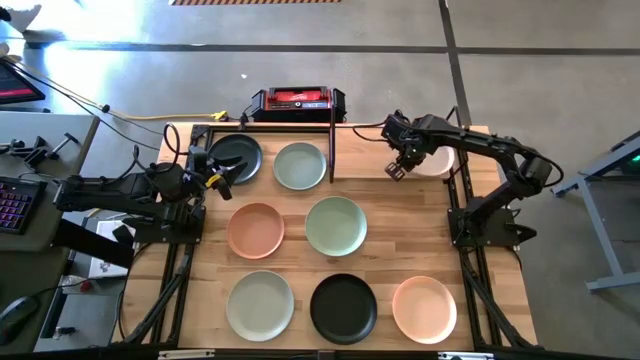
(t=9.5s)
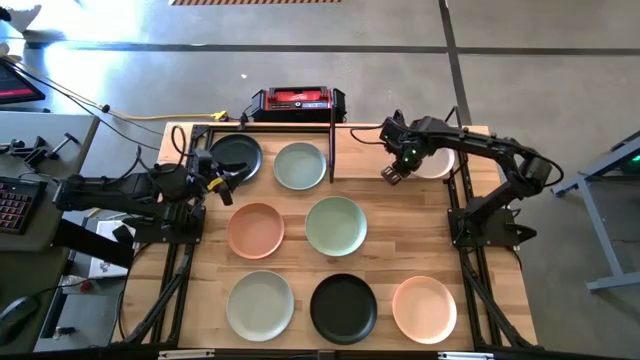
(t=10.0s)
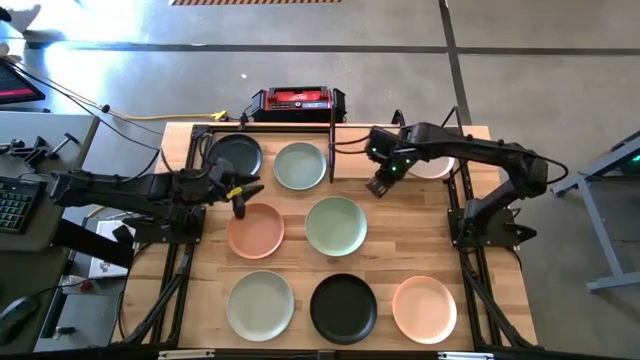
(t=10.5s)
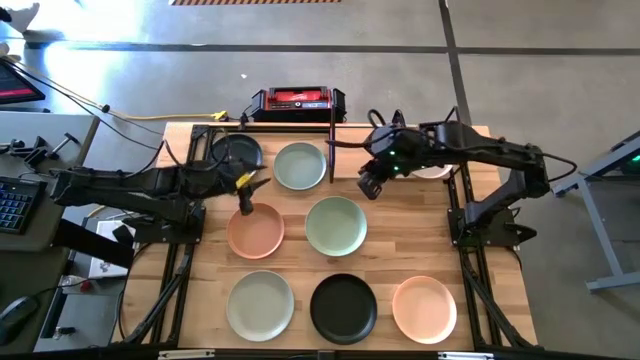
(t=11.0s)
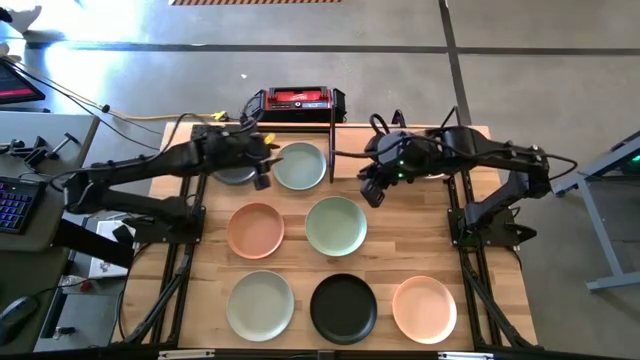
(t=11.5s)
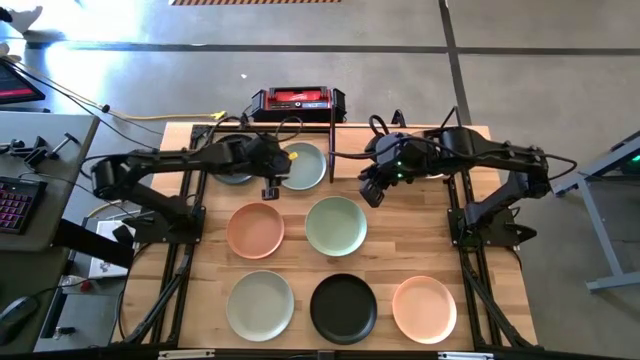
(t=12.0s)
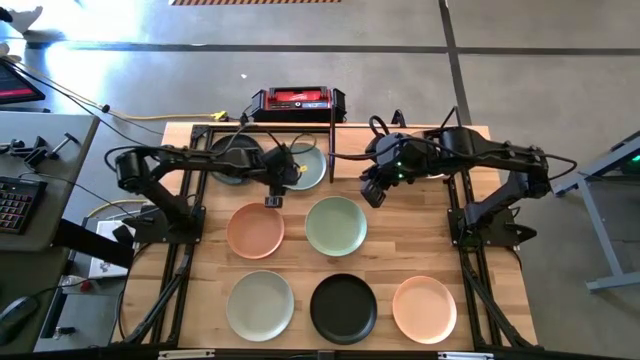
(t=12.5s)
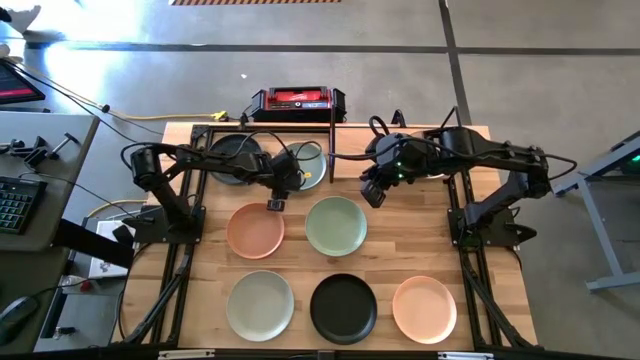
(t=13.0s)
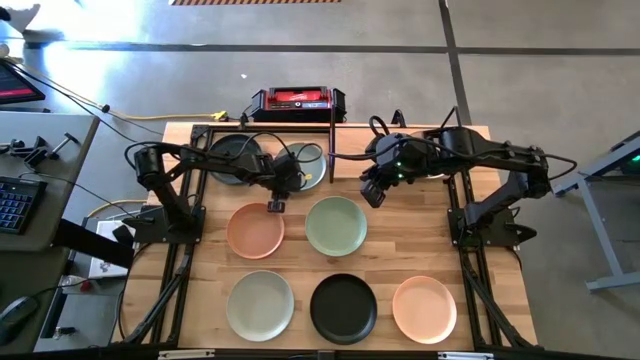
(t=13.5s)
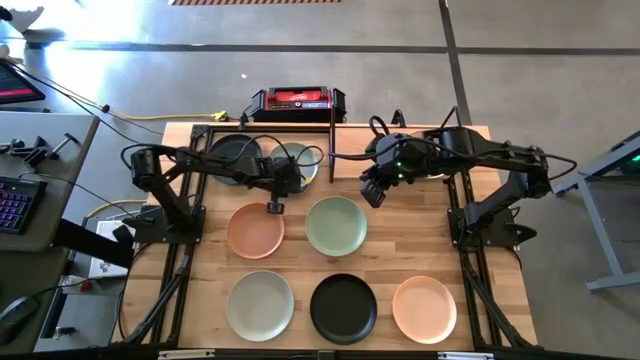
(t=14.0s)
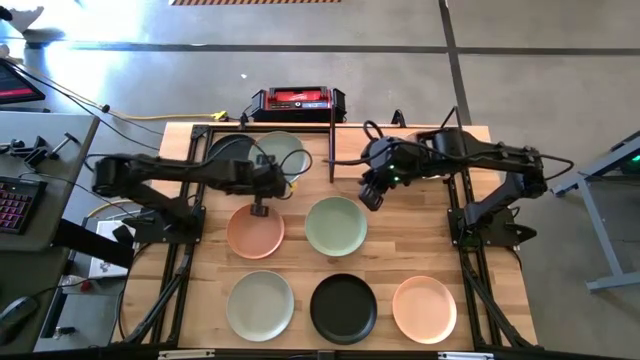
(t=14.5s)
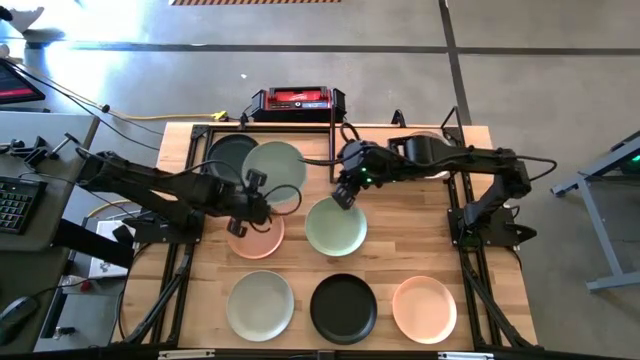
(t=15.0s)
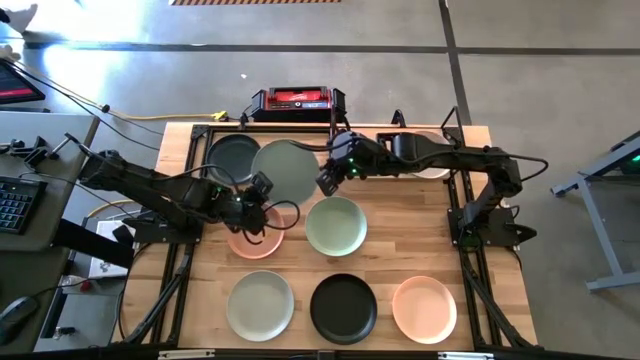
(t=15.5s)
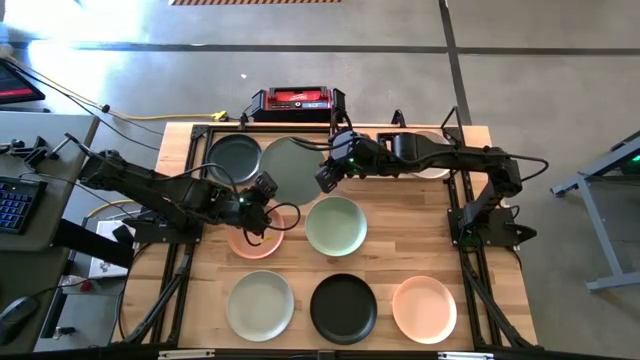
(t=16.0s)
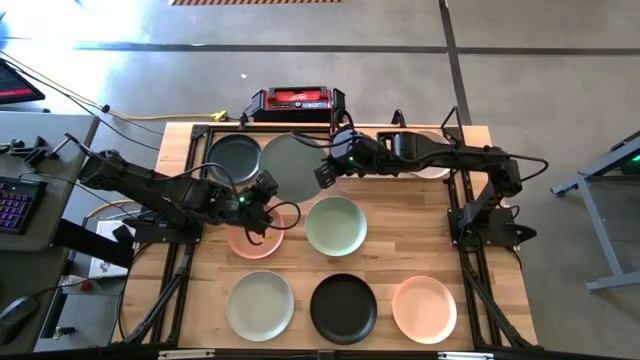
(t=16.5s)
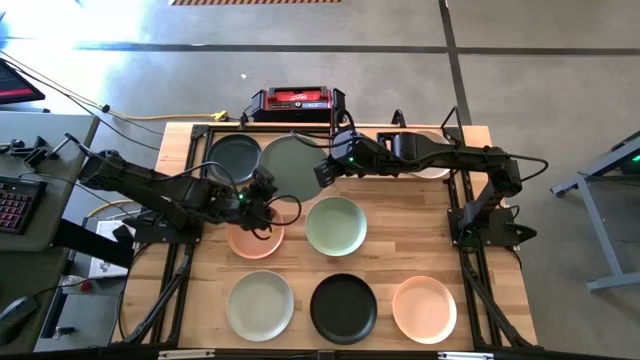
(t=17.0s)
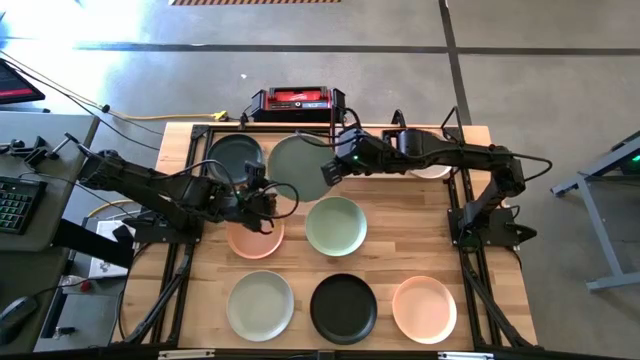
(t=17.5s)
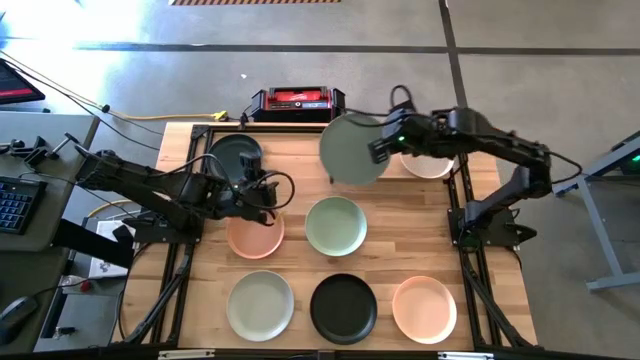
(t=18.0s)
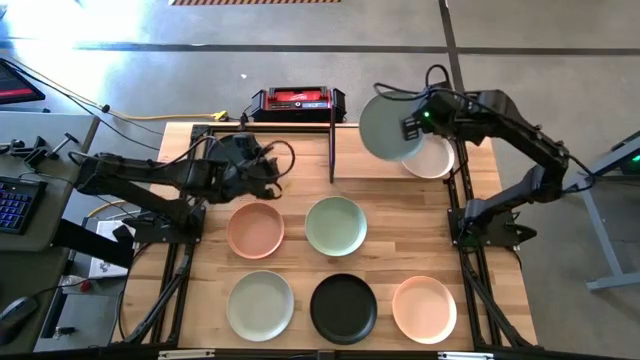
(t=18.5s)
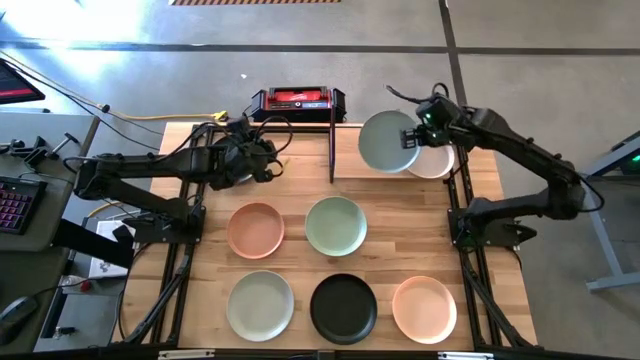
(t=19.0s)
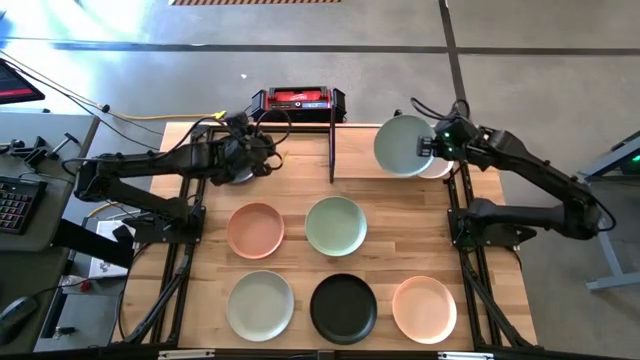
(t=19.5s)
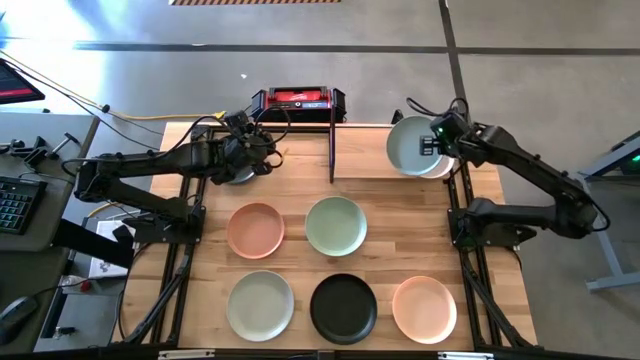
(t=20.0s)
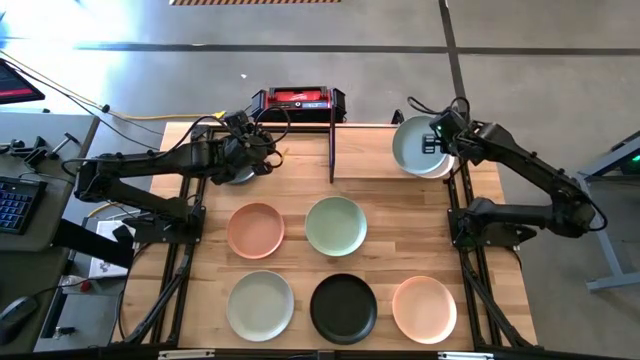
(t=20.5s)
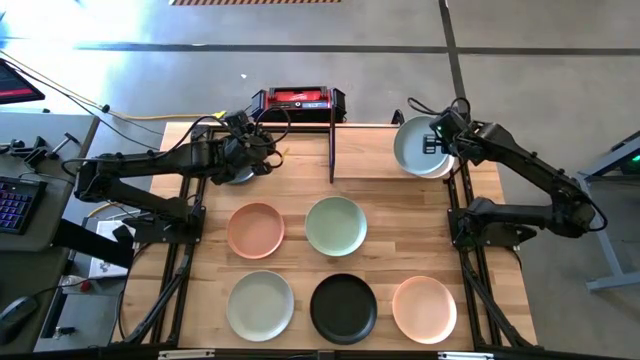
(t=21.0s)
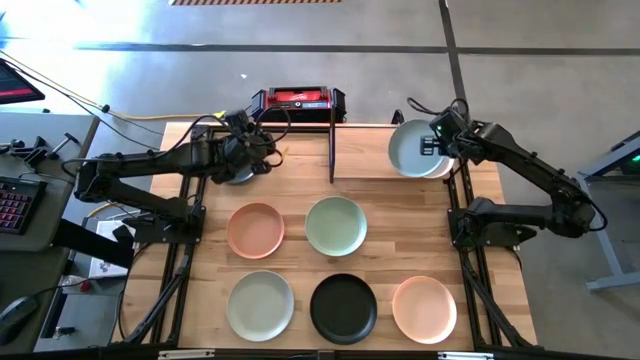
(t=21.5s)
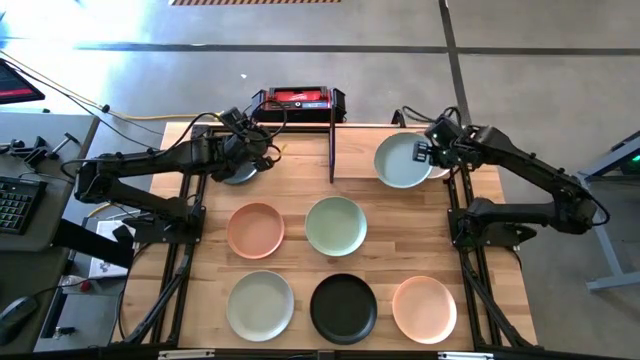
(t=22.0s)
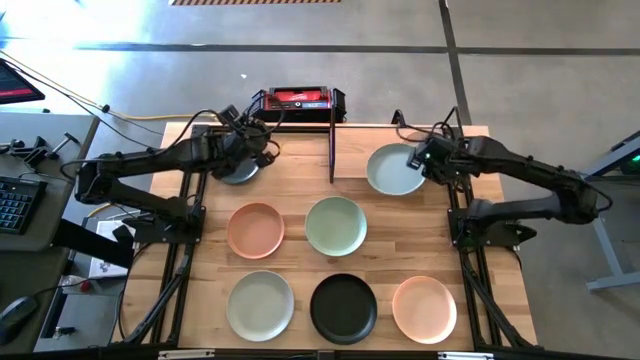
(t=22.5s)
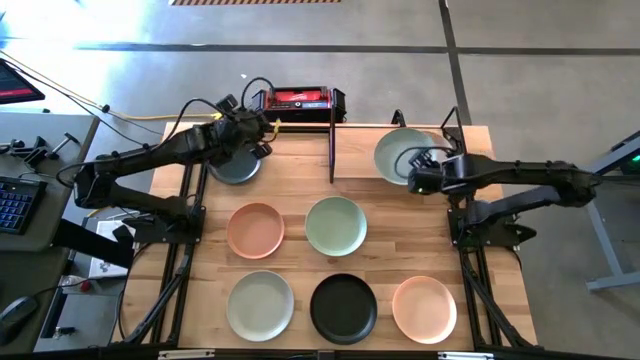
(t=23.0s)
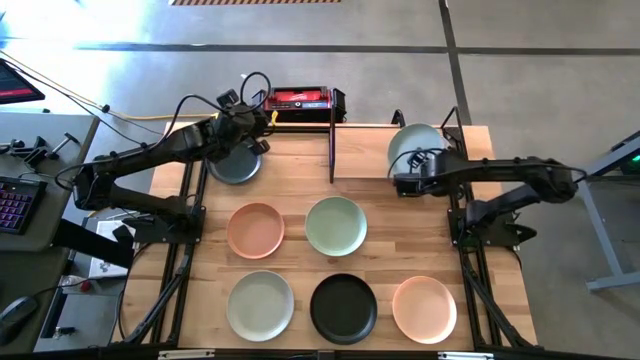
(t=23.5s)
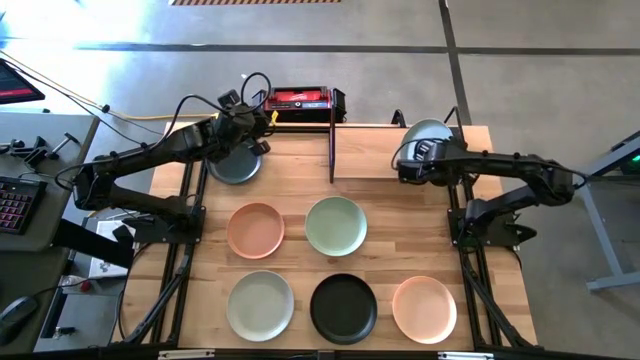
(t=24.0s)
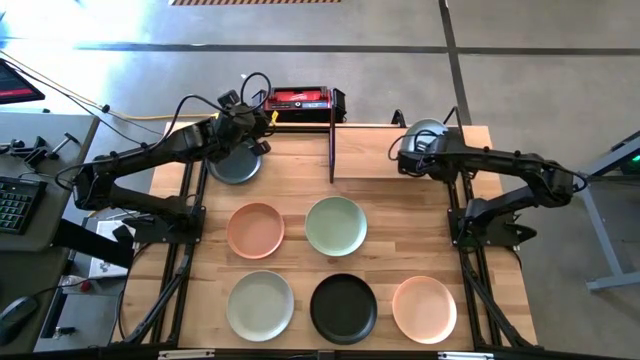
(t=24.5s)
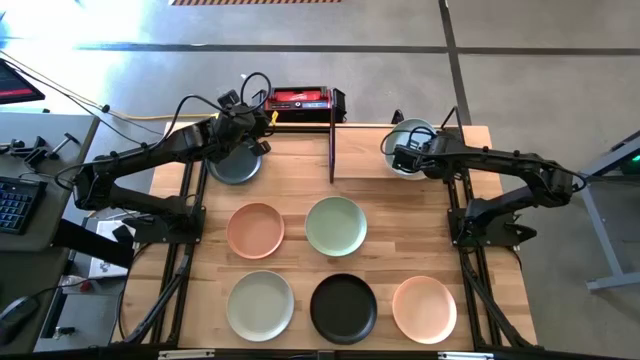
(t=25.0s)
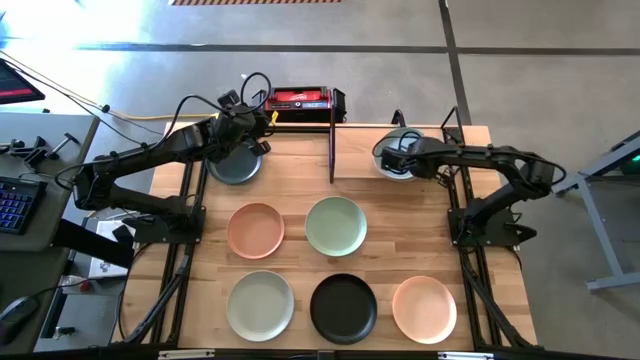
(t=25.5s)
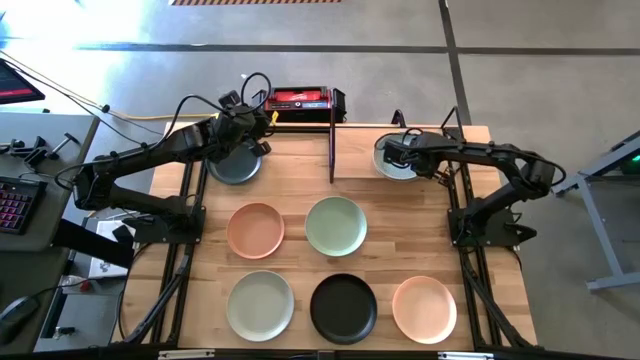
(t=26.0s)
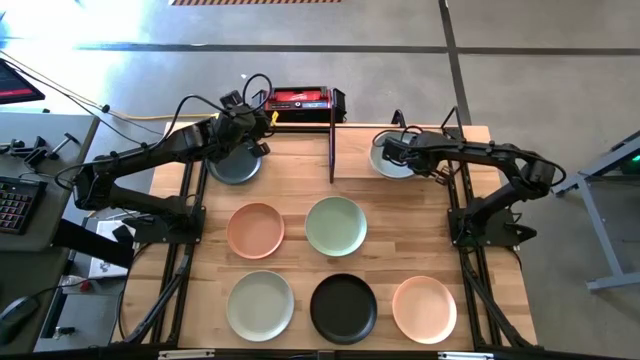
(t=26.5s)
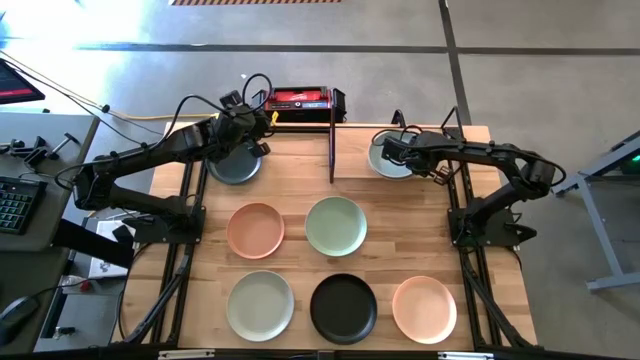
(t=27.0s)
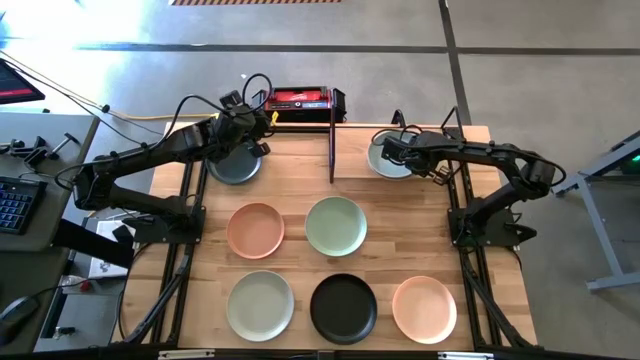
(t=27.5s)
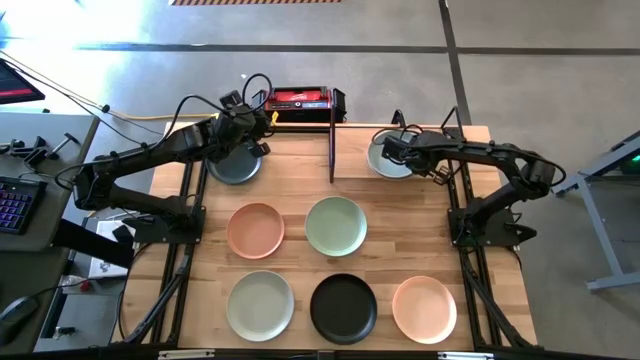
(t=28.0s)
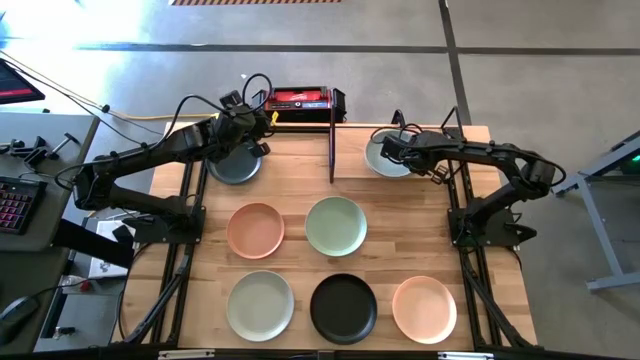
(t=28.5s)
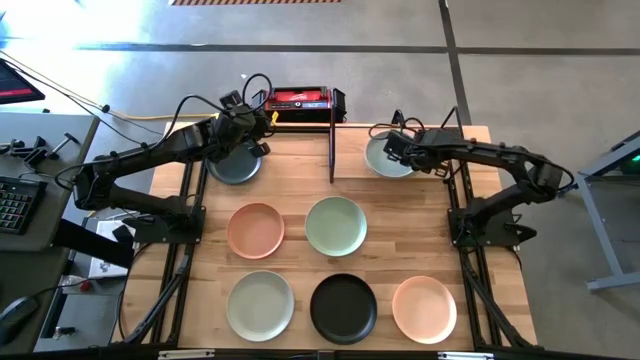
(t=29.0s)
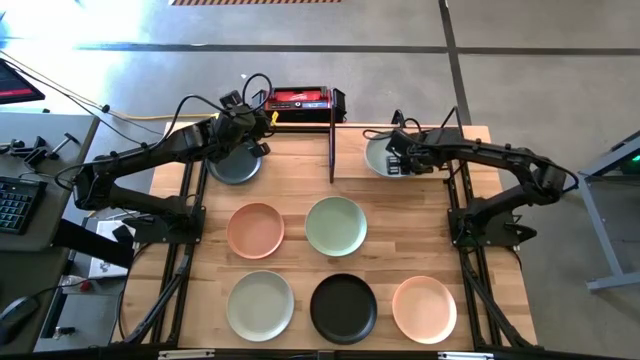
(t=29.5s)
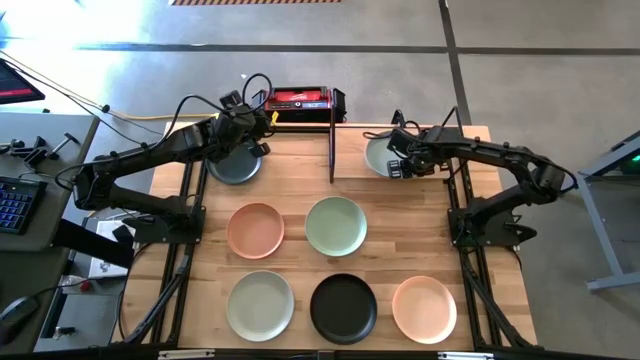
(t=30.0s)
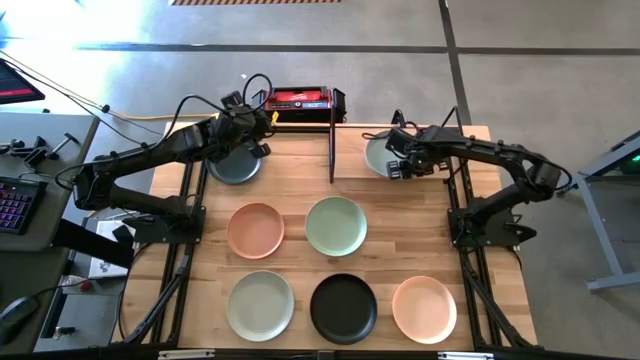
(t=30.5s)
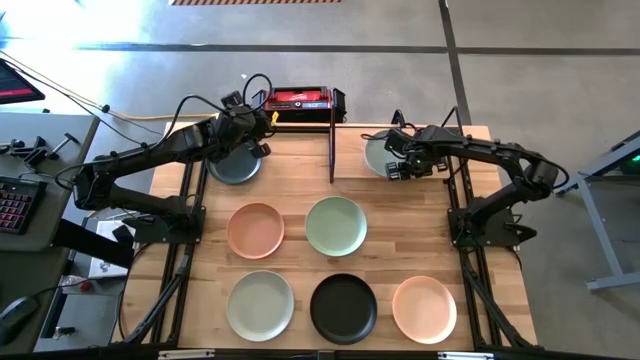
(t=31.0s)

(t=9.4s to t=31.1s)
Task: Place and stack plates onto a shelf
Stack the light blue plate on top of the white plate on the shelf
